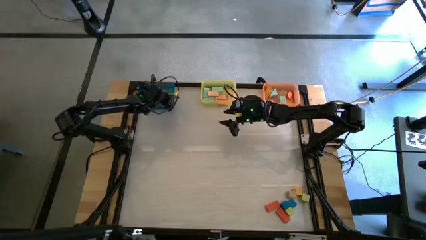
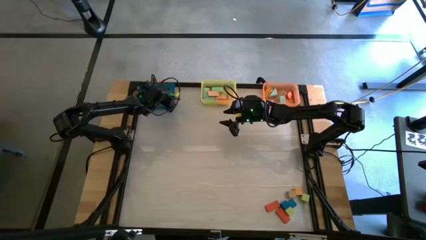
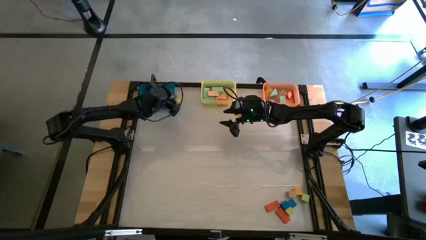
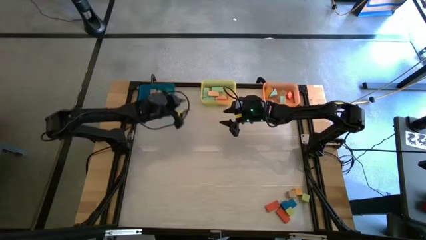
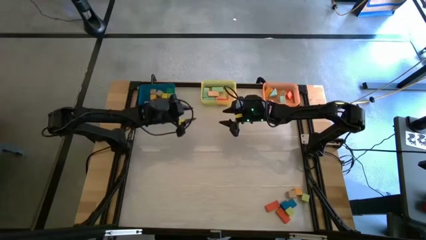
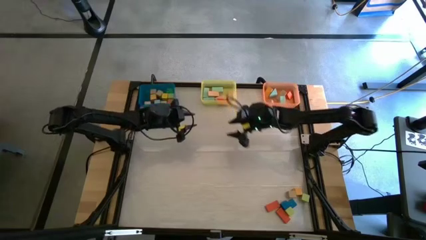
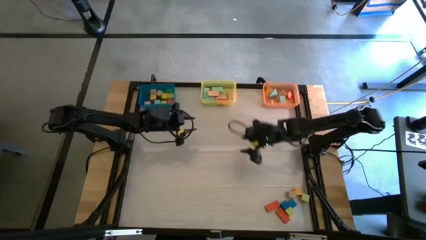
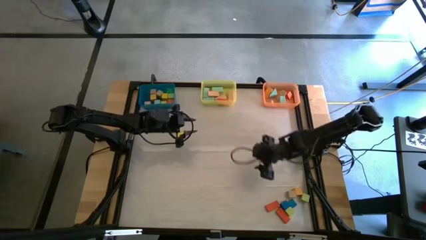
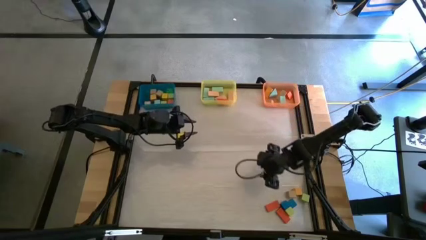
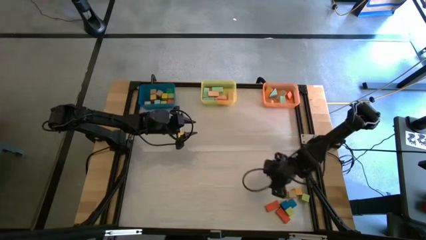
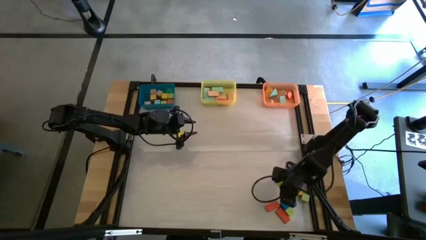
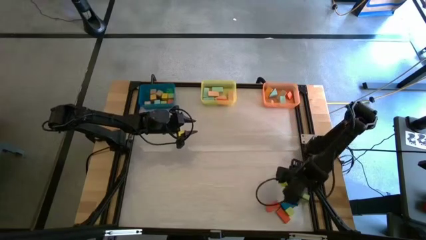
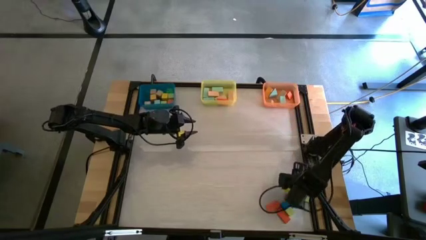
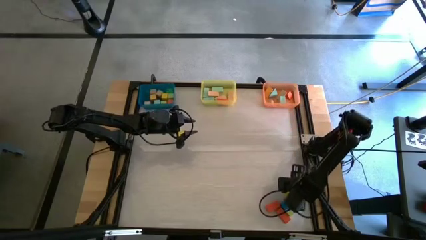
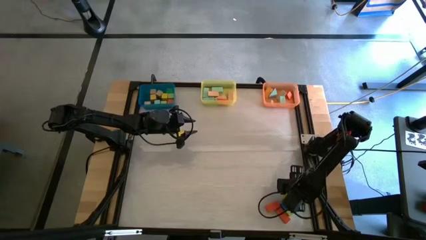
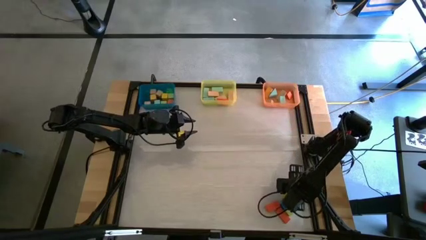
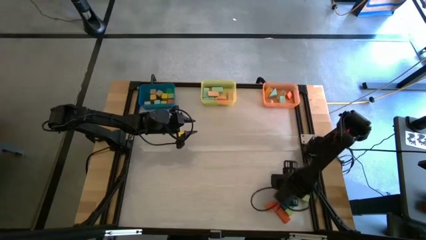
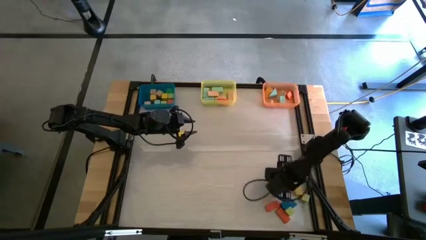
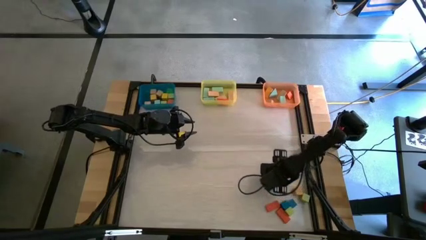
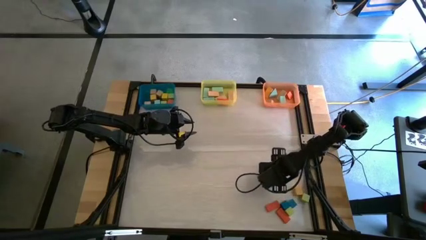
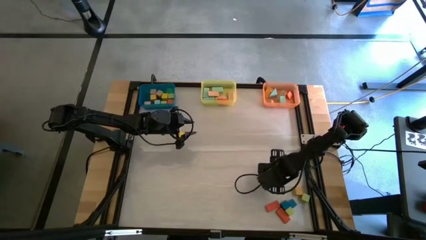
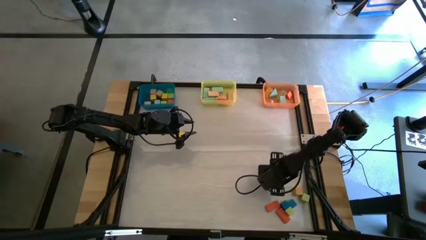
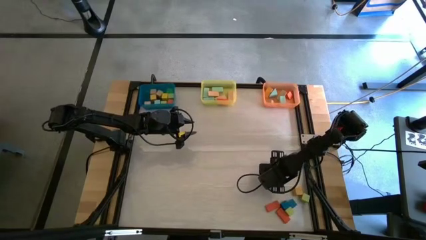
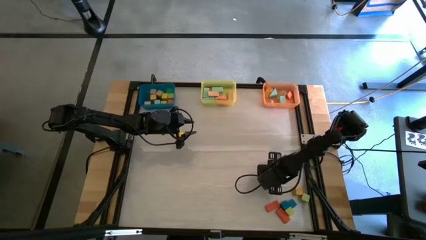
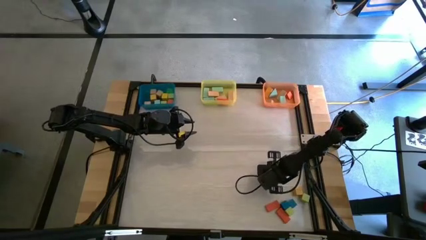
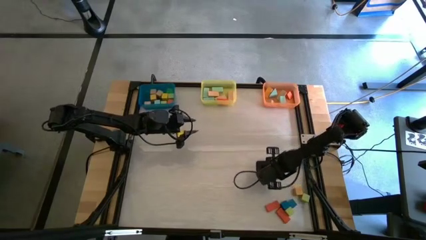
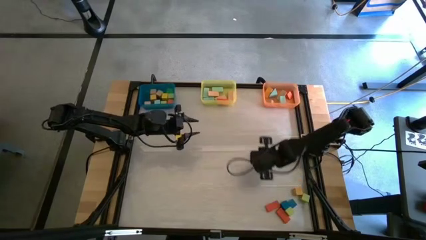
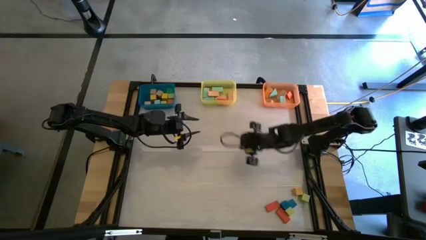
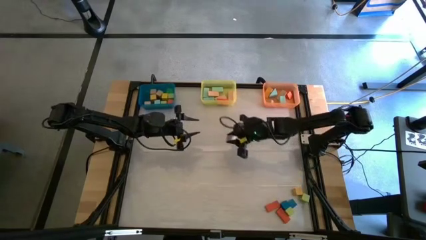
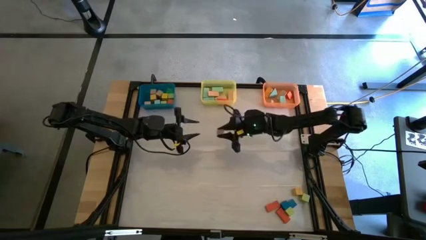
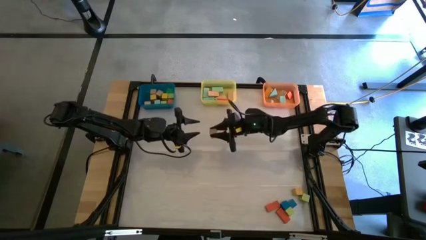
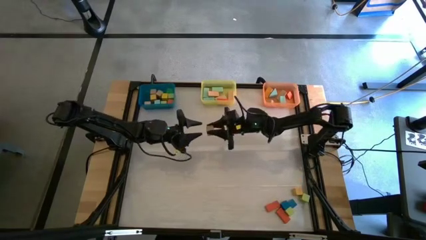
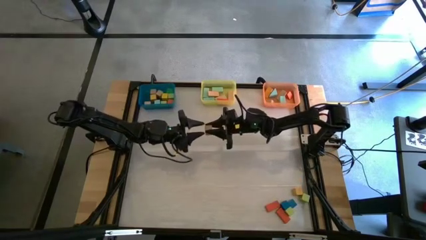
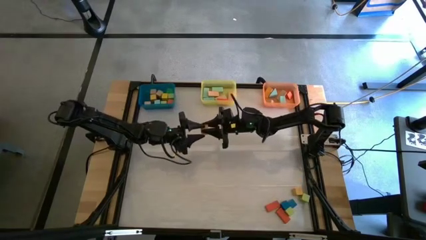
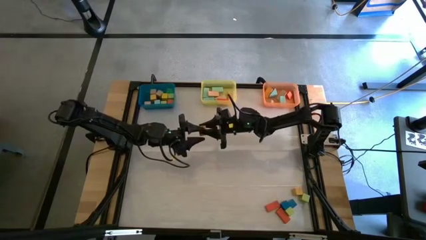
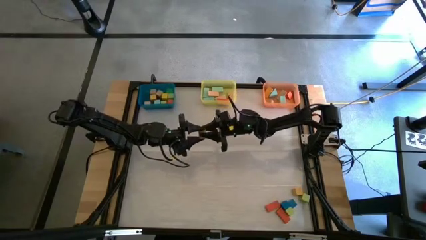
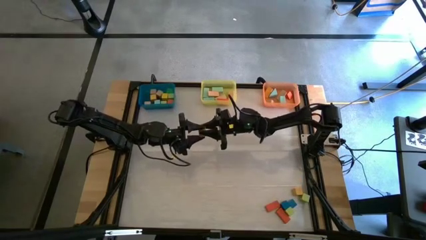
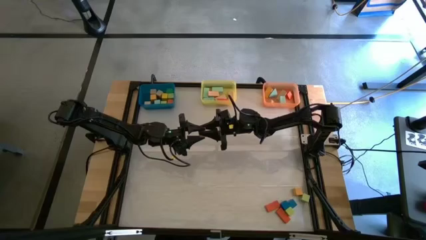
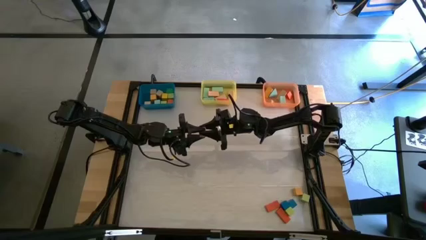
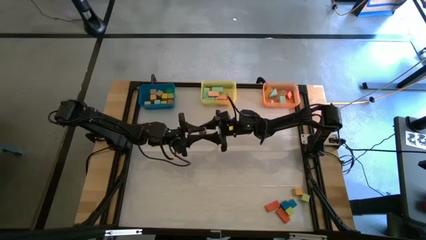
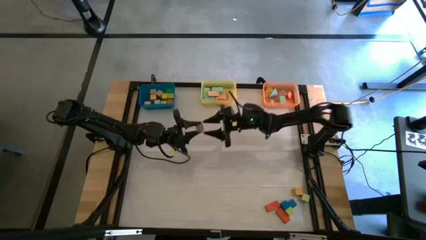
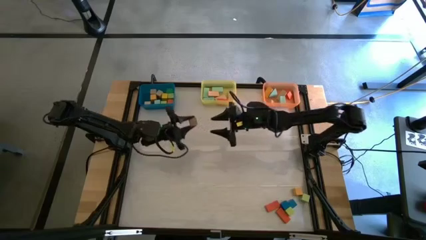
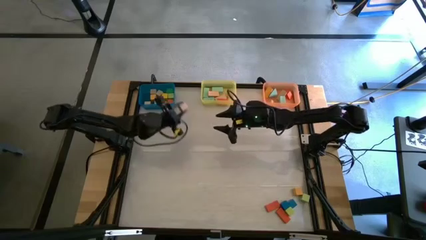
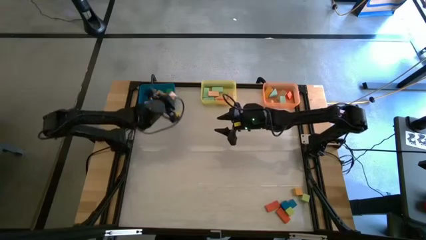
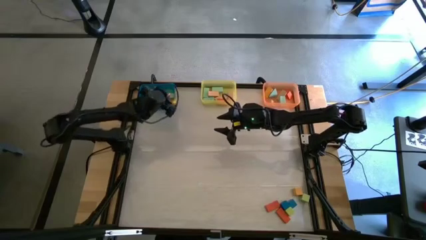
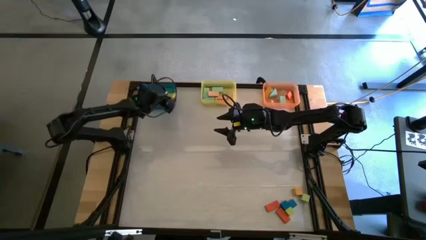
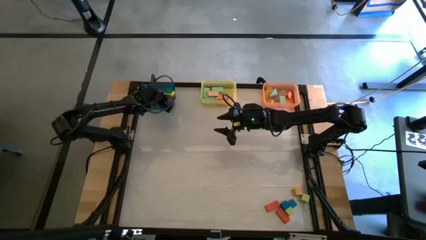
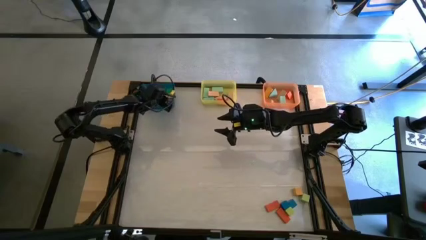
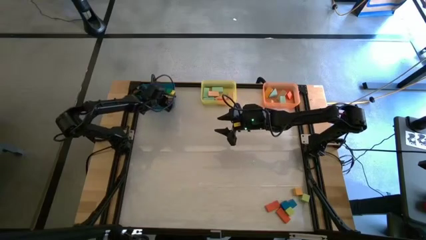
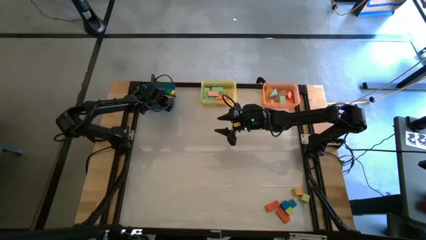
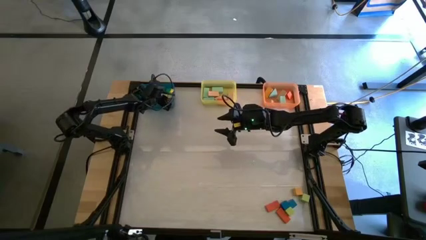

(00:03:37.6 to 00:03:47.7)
Task: Sort blocks by size
Put the brown square block into the blue bin

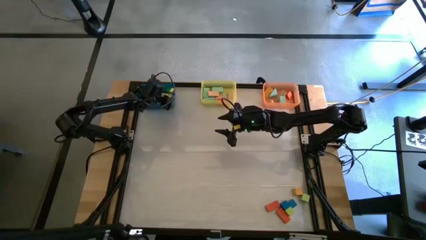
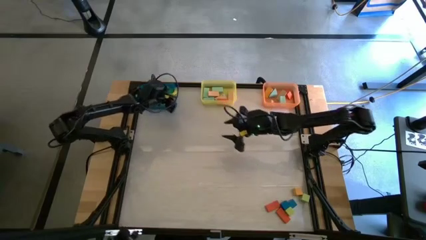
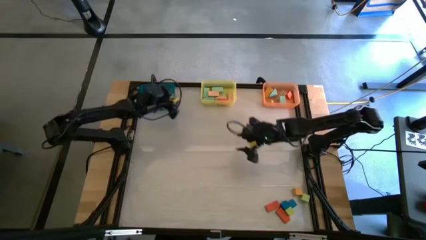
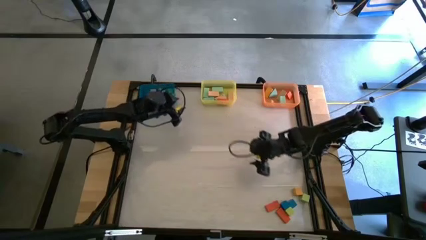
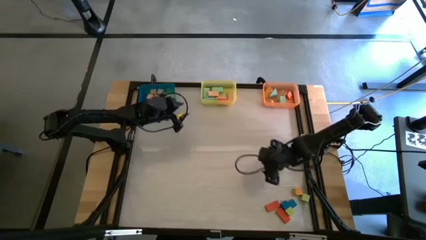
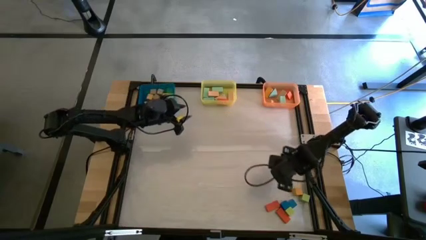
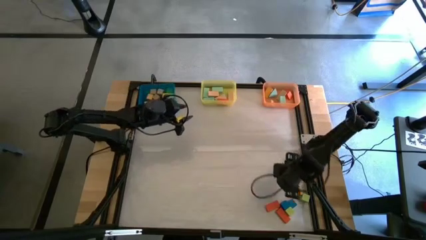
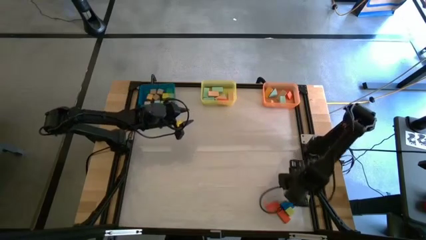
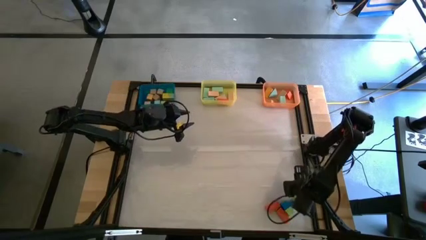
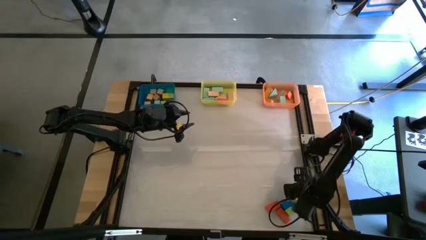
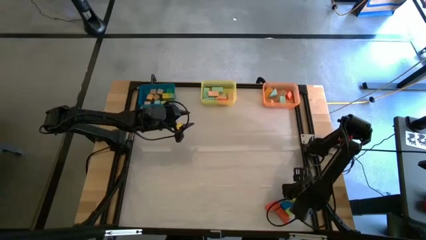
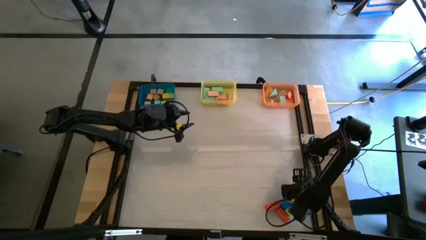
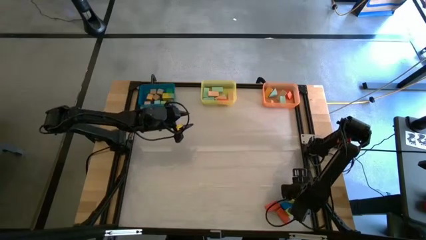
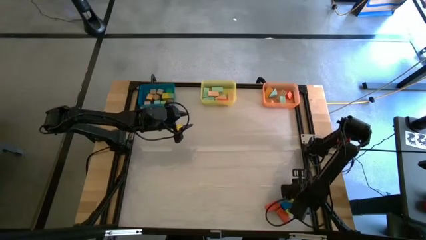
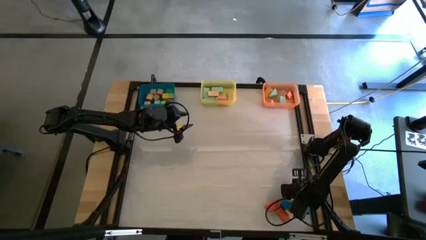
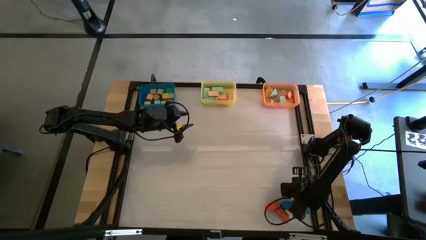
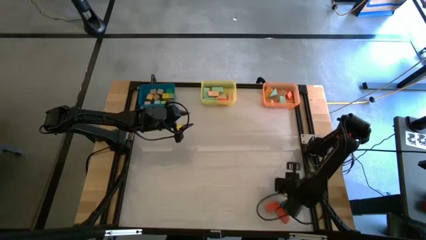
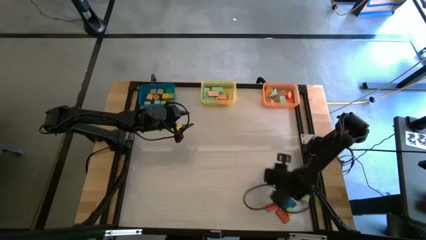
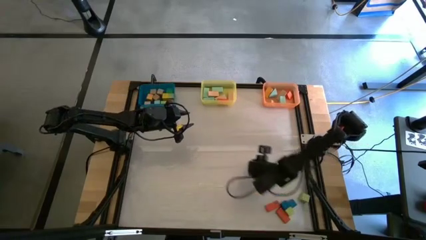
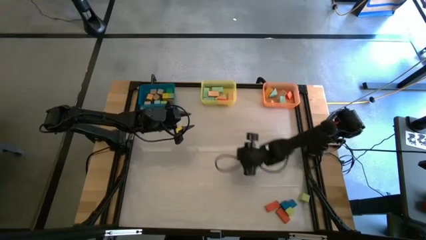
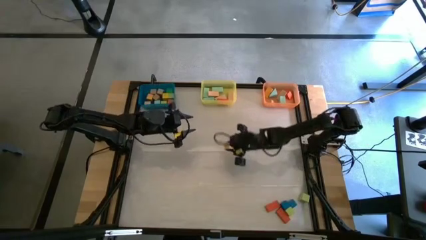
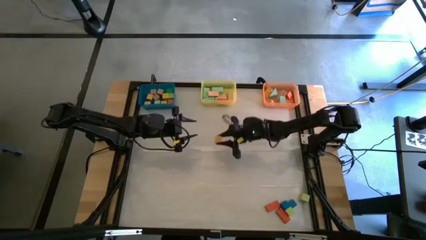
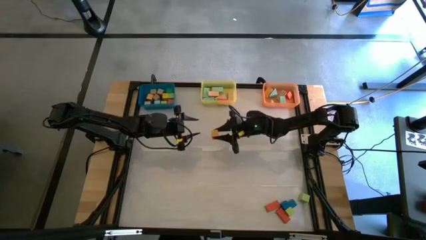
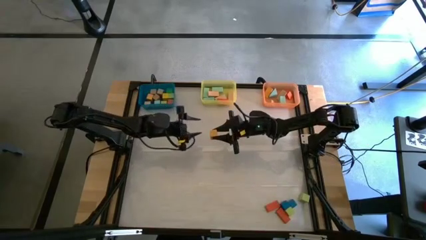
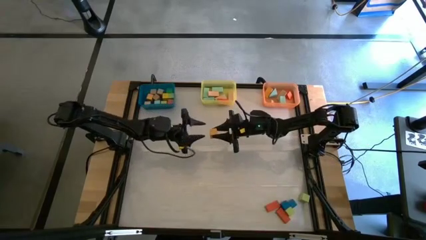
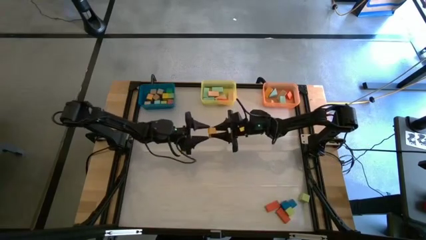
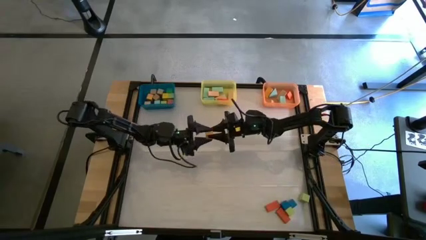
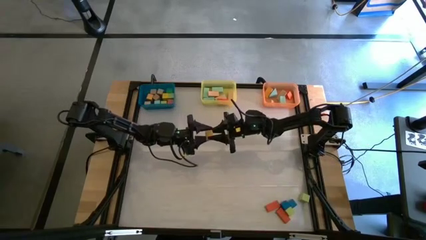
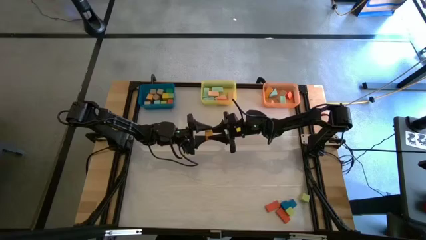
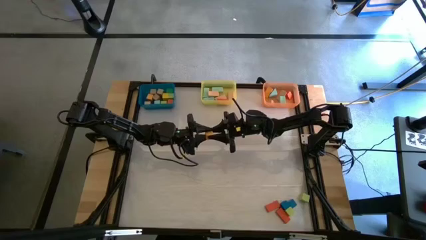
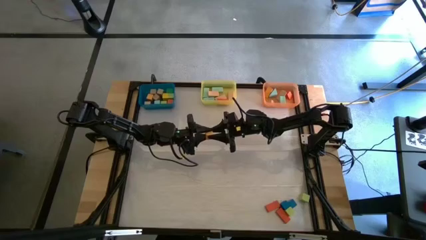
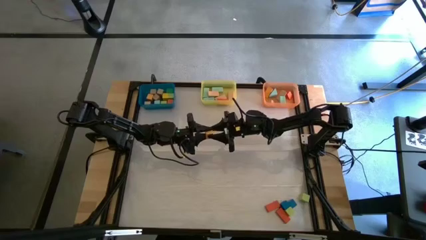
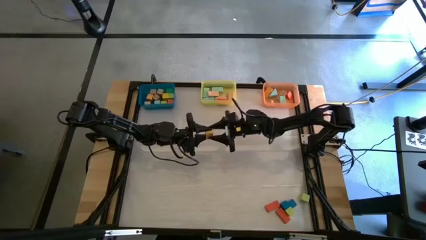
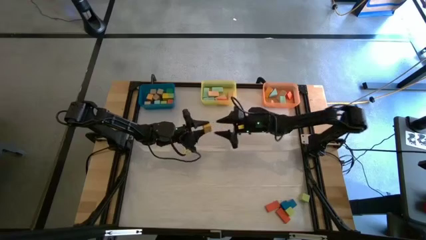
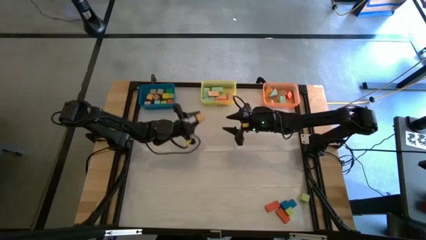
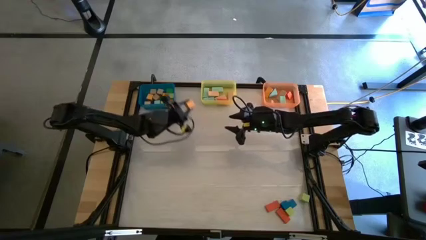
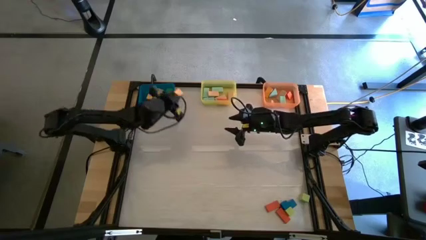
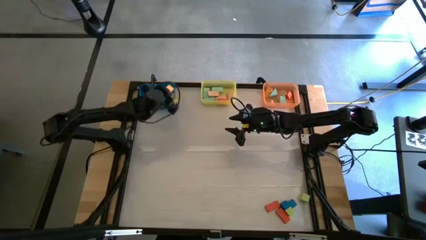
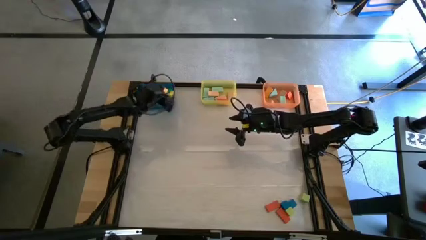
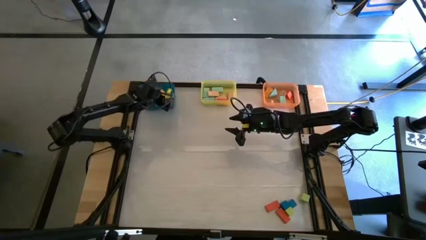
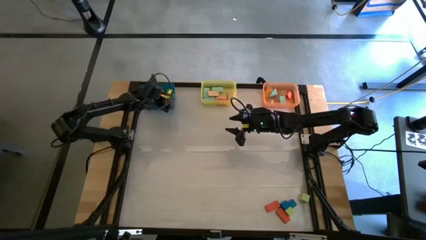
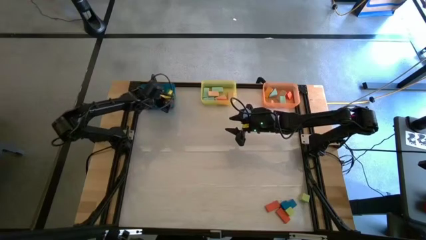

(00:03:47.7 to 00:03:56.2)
Put the yellow square block into the blue bin
